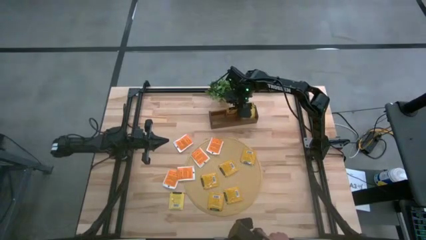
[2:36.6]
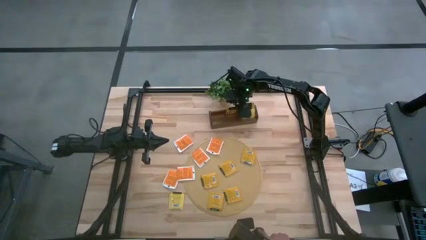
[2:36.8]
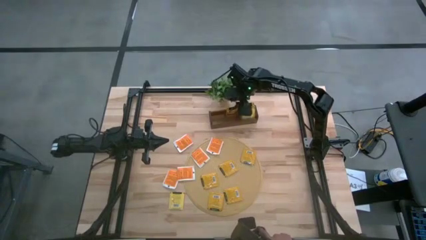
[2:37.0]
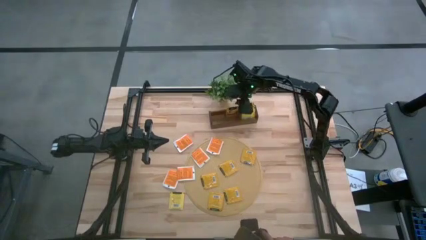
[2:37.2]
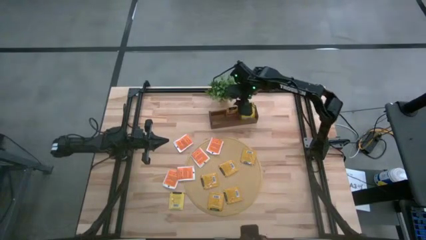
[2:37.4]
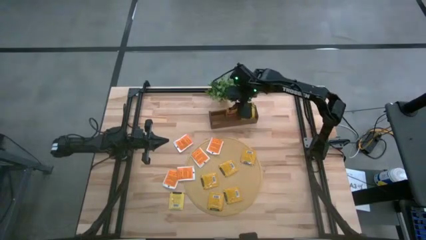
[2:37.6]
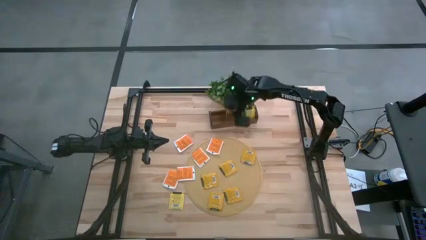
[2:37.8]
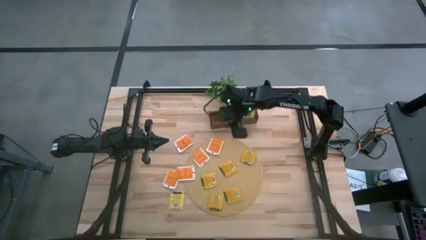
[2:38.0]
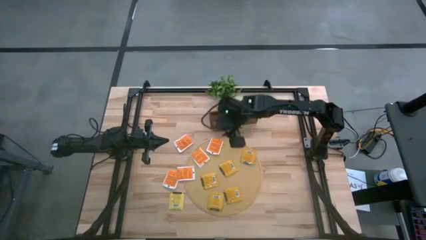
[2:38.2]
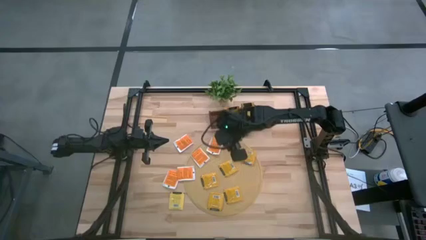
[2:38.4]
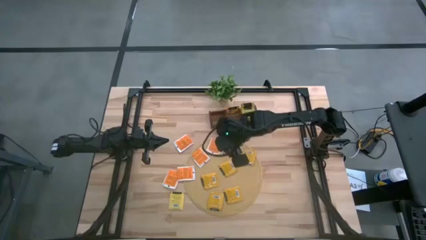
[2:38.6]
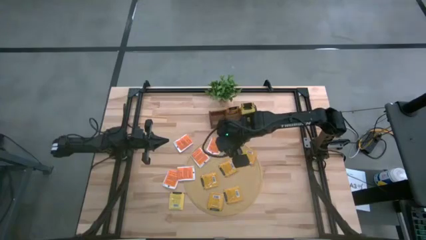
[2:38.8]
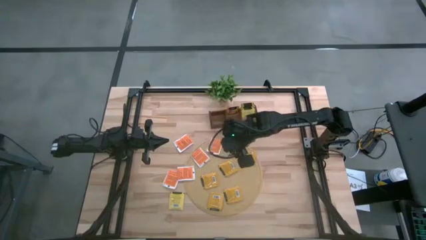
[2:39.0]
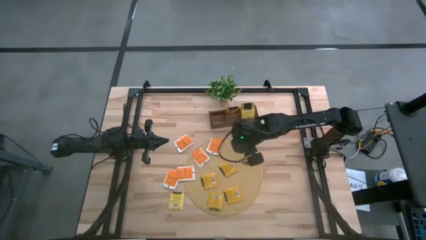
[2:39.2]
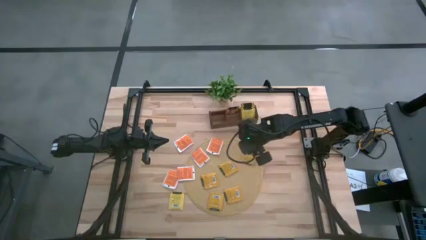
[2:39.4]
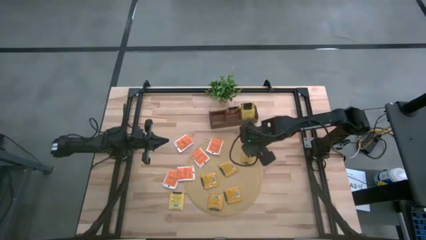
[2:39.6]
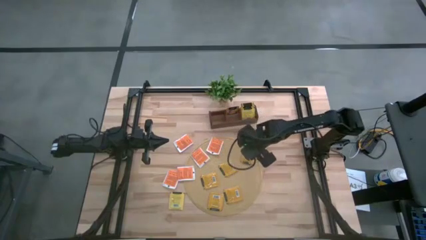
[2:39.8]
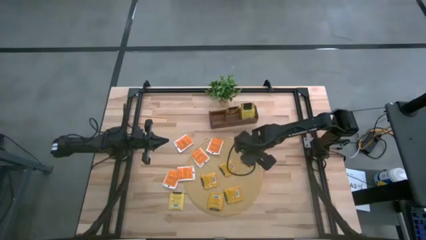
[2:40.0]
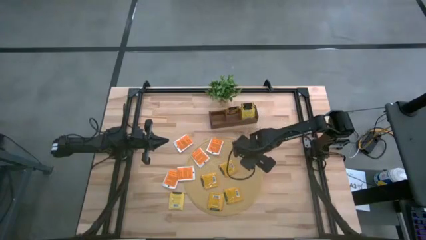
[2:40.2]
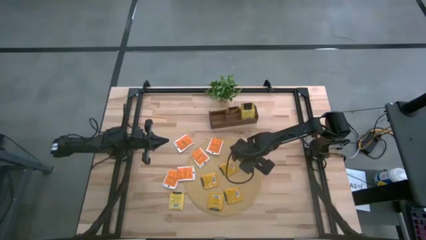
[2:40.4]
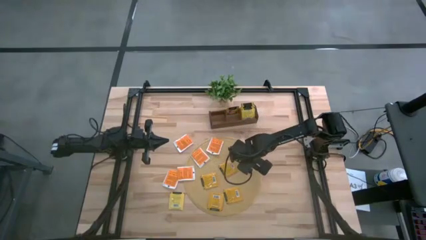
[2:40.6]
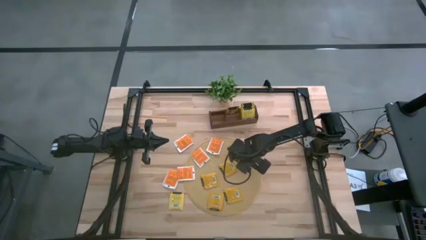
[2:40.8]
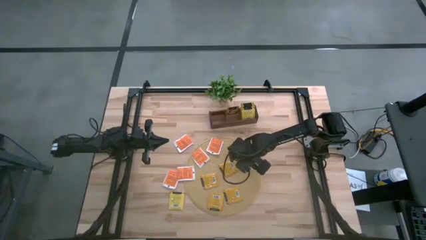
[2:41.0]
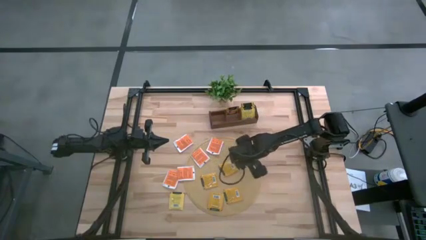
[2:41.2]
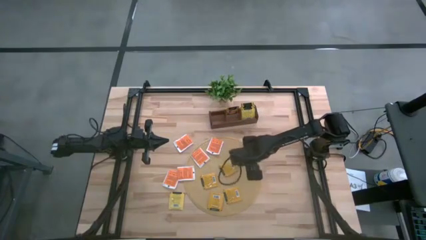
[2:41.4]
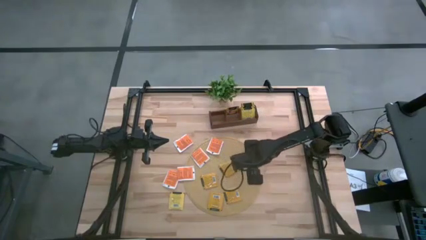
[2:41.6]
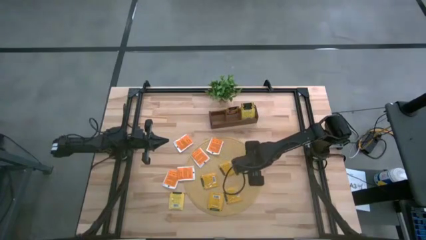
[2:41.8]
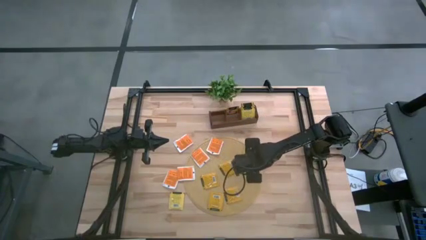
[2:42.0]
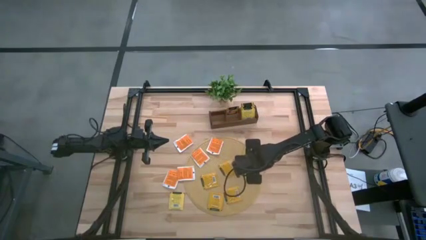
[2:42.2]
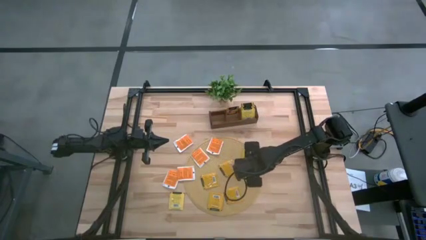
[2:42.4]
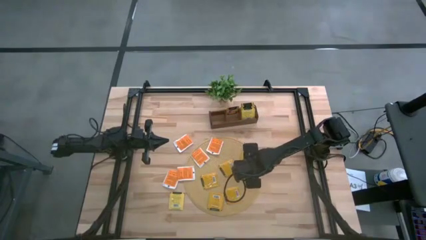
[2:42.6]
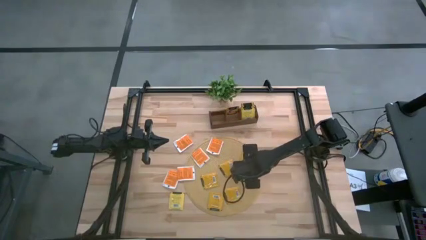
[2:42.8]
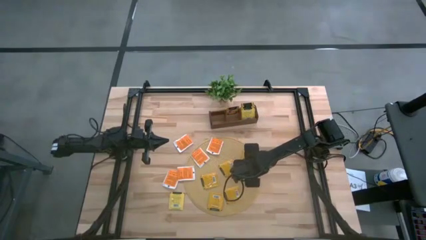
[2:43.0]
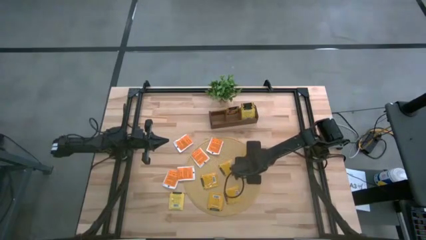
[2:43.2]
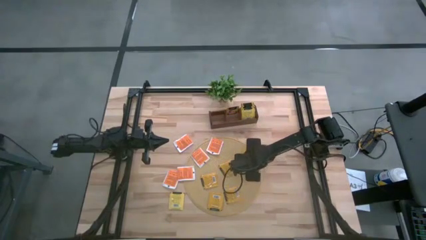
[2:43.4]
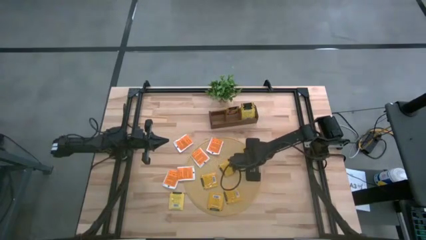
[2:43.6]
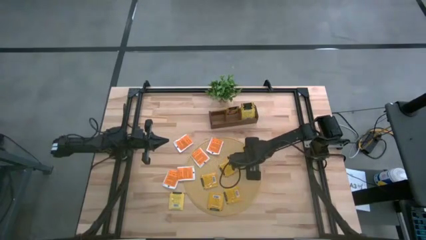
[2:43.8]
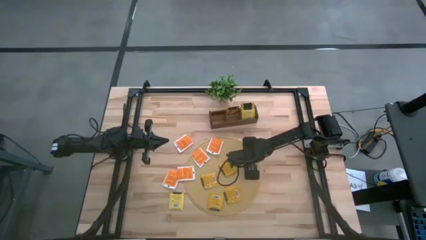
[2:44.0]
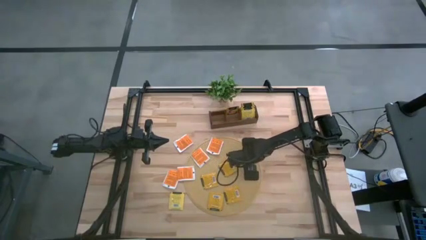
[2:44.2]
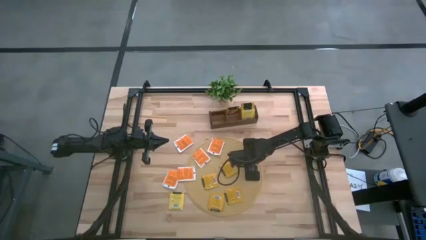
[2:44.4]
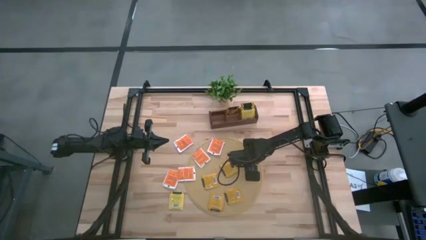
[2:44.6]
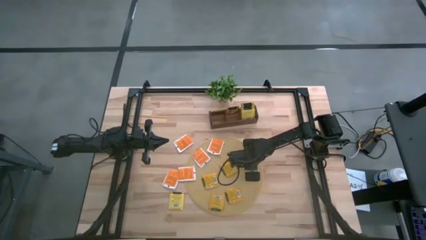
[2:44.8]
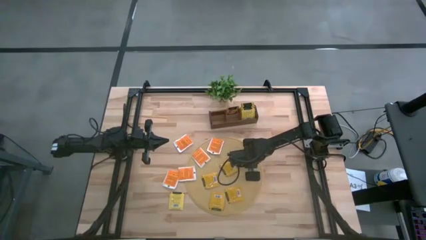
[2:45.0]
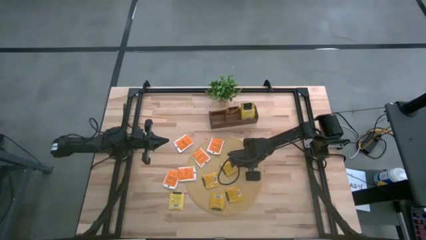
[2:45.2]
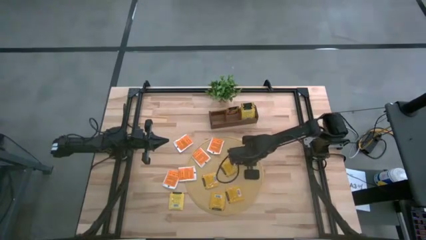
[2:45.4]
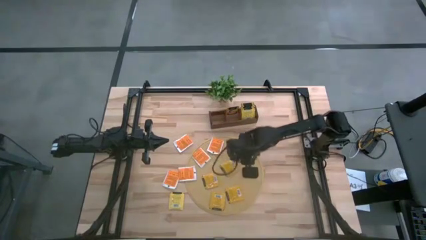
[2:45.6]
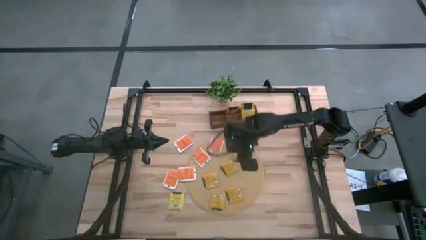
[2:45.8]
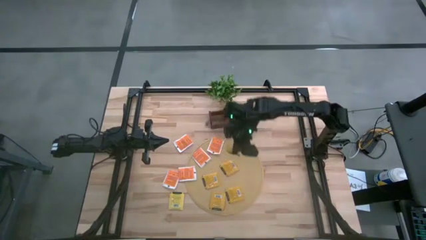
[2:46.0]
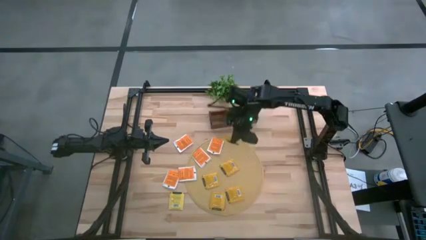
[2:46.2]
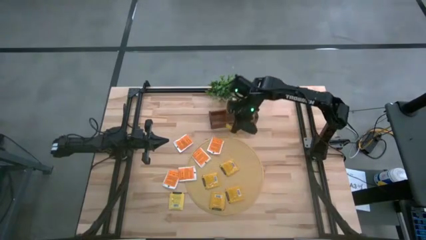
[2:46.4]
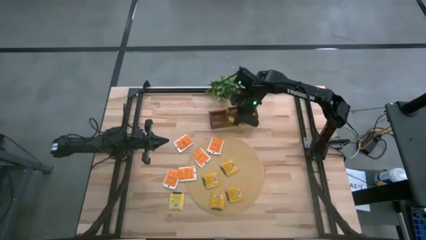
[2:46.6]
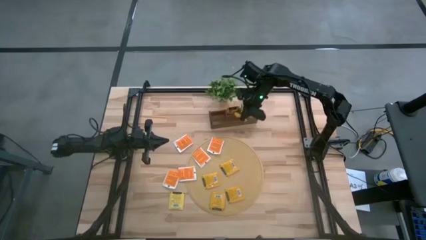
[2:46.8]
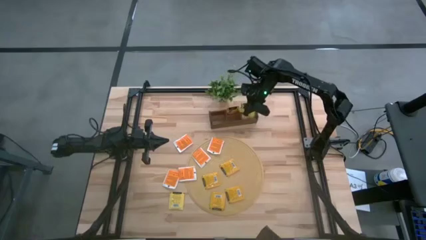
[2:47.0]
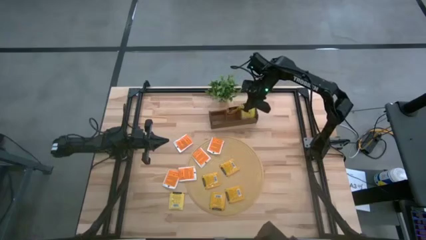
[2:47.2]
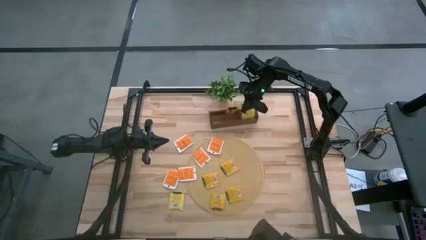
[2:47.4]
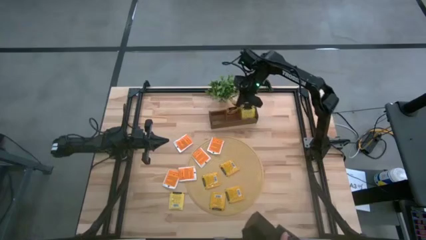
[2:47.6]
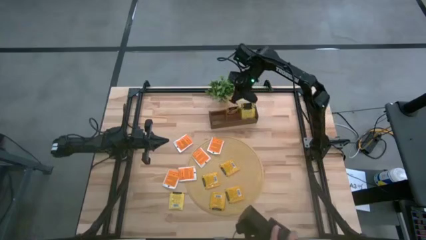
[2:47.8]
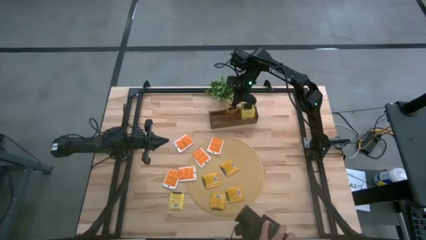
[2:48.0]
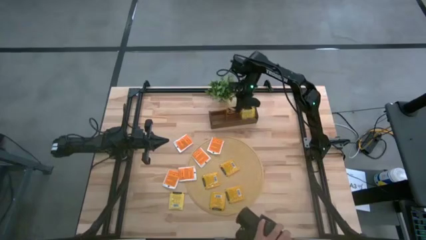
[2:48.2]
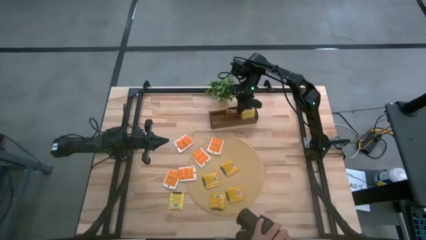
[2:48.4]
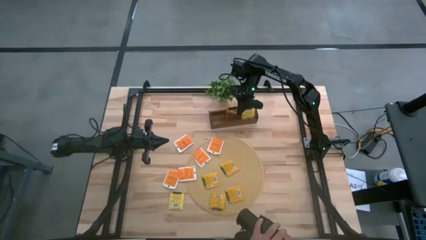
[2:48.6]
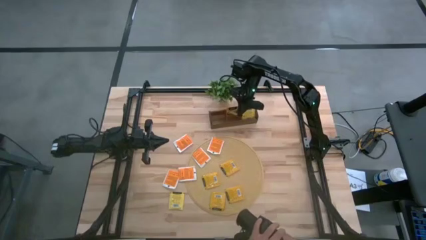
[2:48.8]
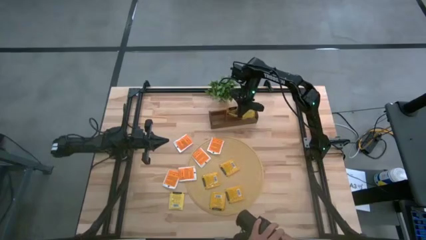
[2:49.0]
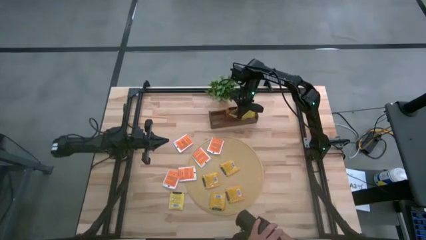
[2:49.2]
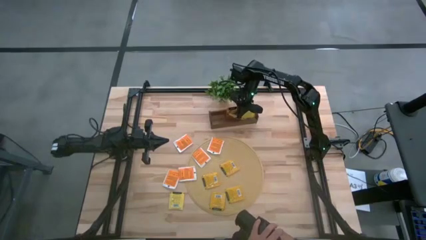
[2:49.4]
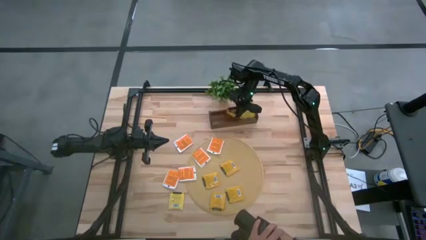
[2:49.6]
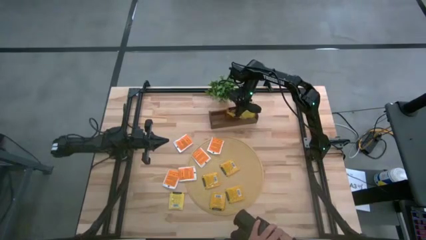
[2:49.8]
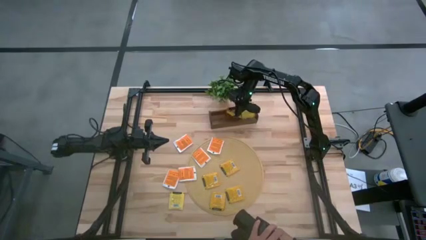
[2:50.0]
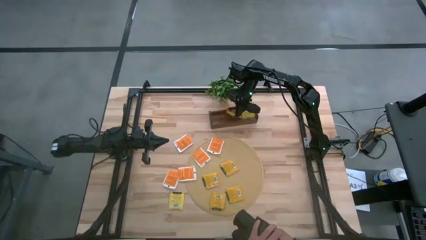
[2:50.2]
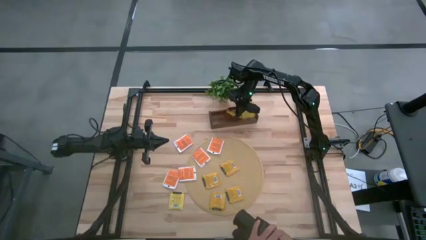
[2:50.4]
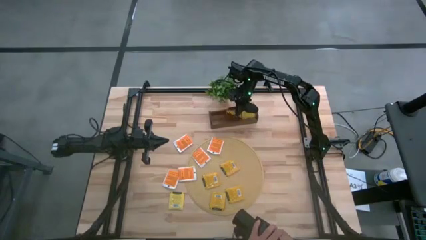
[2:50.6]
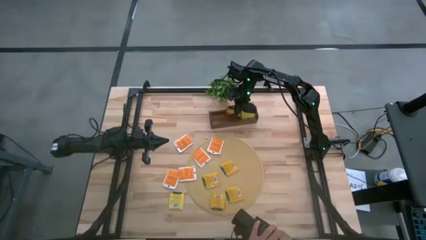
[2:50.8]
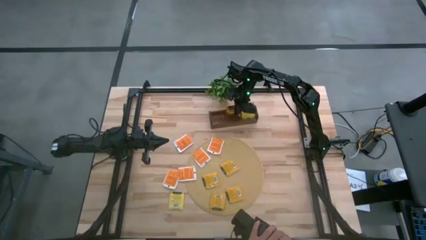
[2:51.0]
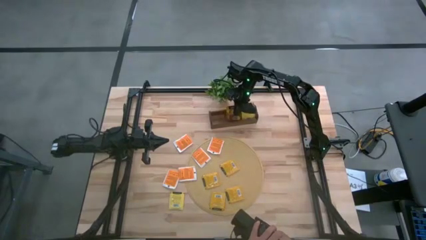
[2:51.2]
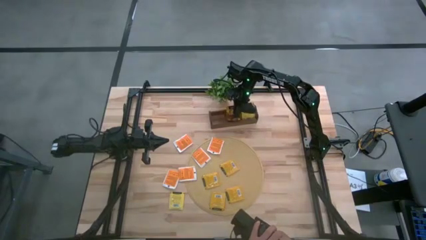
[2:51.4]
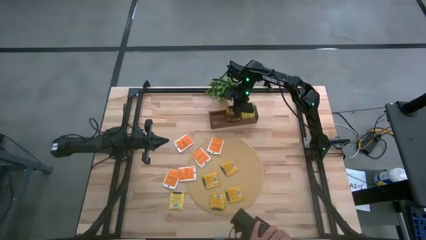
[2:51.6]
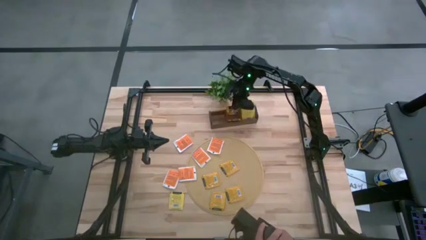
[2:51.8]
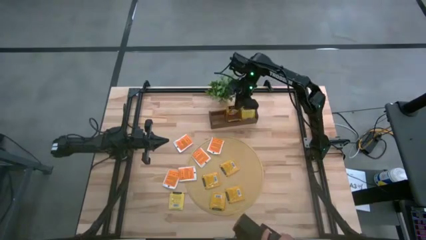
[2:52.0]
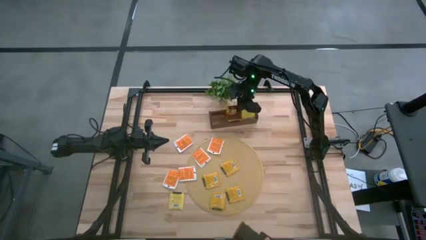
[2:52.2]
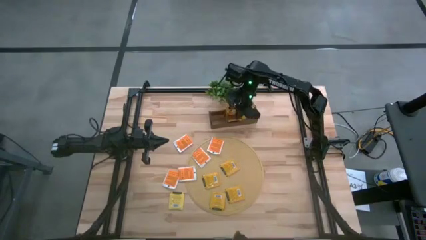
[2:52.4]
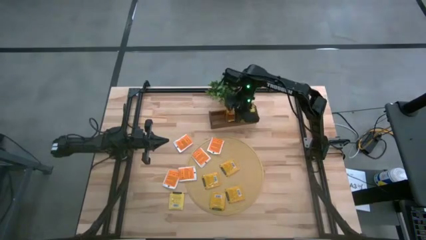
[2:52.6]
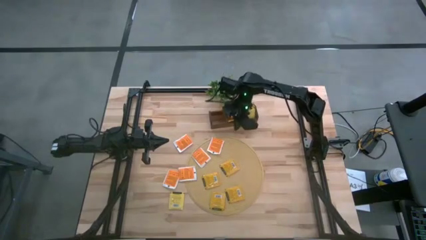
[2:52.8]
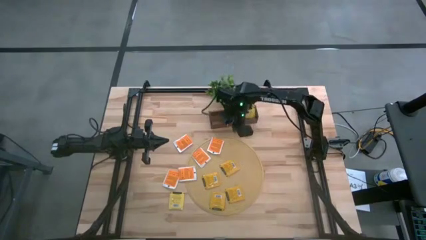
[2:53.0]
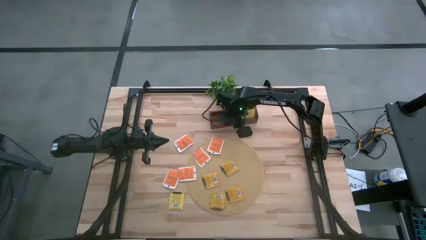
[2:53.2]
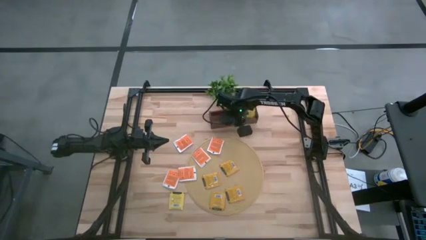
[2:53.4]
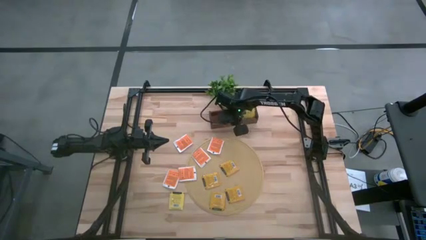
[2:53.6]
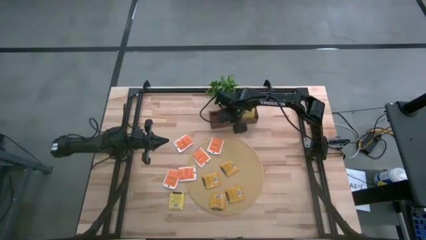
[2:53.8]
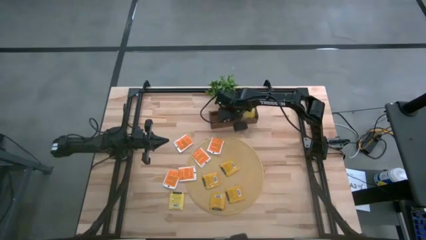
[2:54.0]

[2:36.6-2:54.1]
Task: Pick & Place Tea
Put the orange tea bag into the middle section of the wooden organizer
